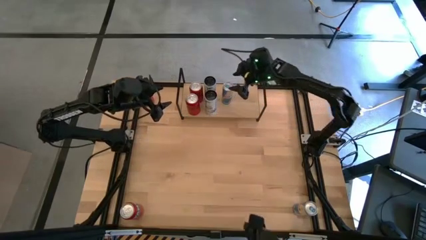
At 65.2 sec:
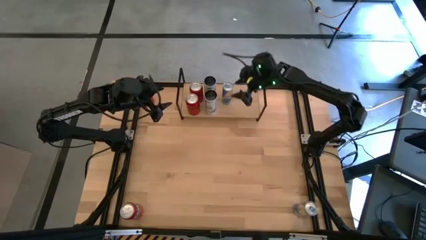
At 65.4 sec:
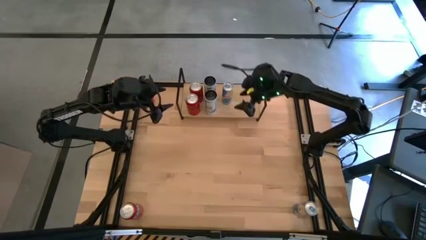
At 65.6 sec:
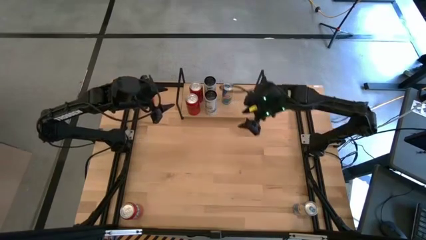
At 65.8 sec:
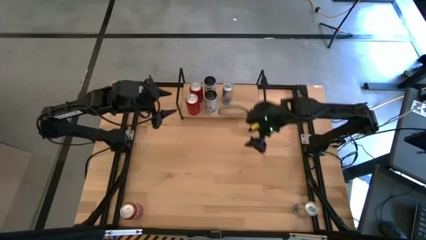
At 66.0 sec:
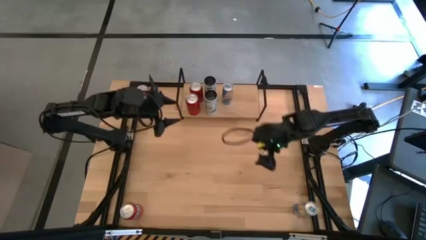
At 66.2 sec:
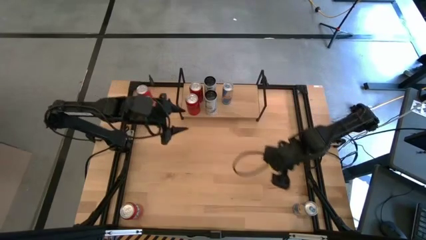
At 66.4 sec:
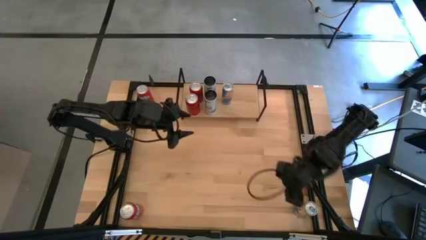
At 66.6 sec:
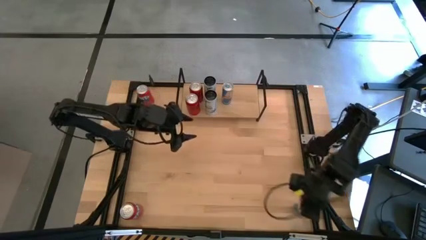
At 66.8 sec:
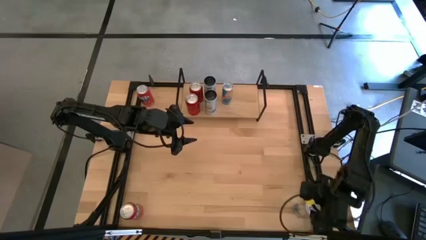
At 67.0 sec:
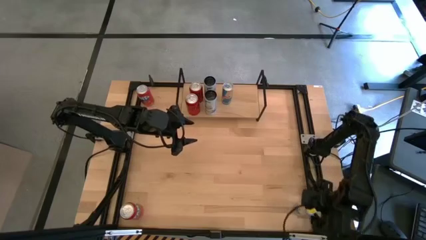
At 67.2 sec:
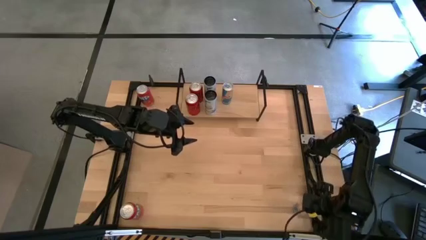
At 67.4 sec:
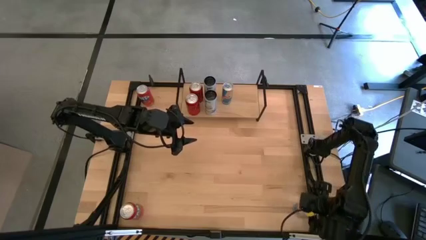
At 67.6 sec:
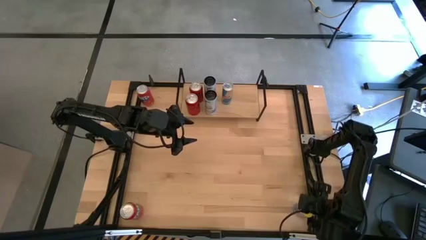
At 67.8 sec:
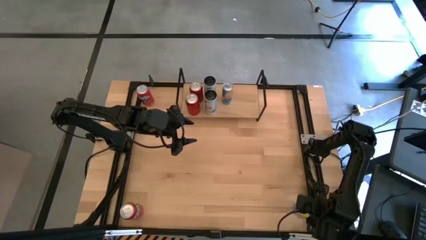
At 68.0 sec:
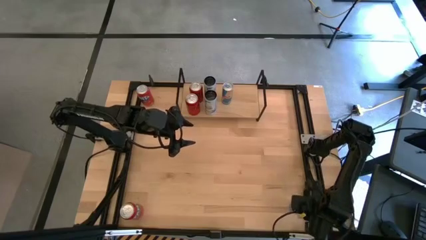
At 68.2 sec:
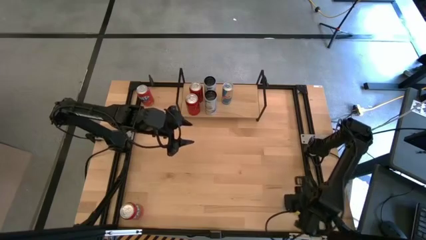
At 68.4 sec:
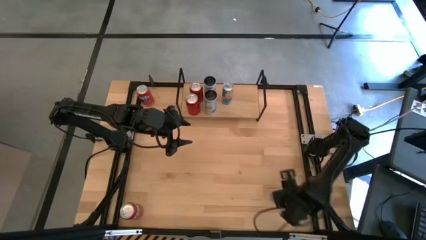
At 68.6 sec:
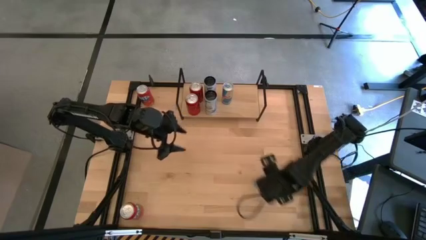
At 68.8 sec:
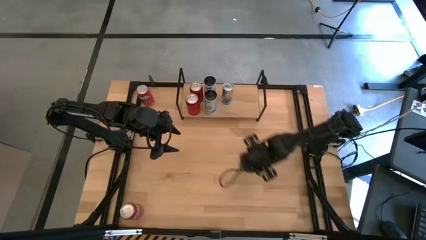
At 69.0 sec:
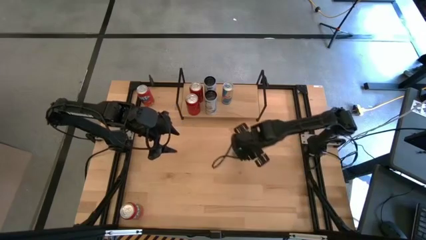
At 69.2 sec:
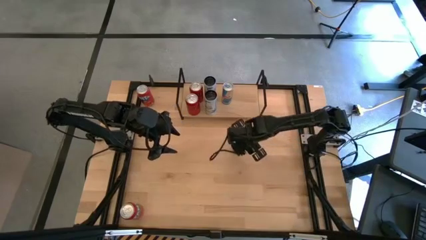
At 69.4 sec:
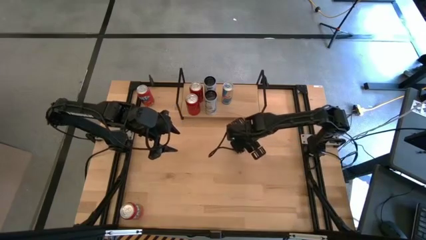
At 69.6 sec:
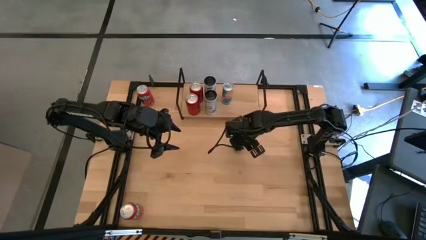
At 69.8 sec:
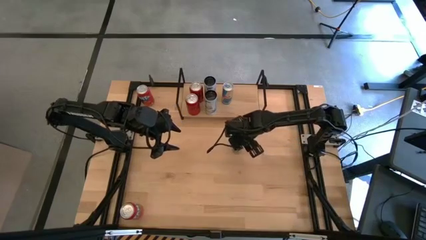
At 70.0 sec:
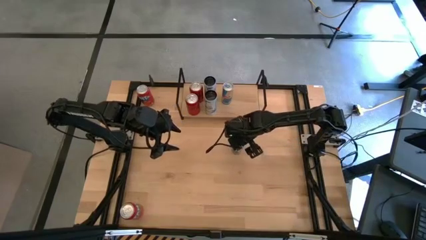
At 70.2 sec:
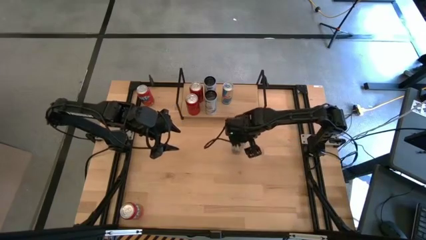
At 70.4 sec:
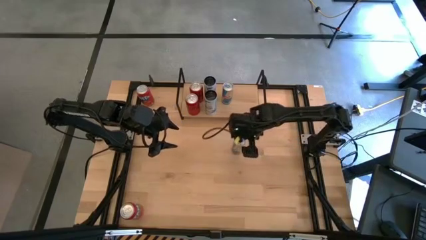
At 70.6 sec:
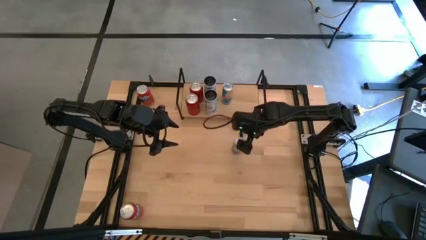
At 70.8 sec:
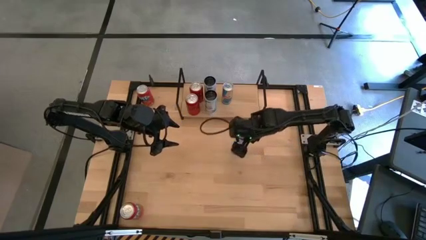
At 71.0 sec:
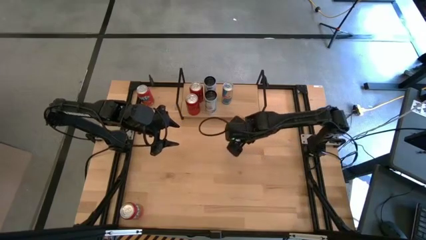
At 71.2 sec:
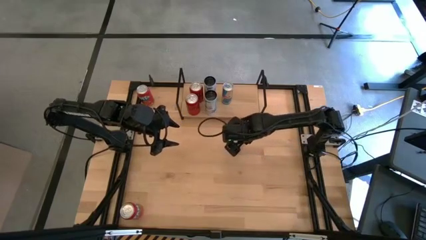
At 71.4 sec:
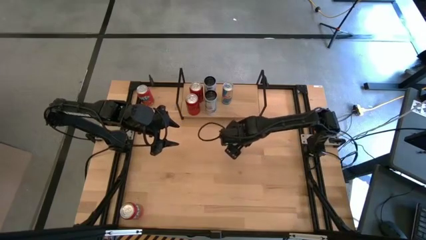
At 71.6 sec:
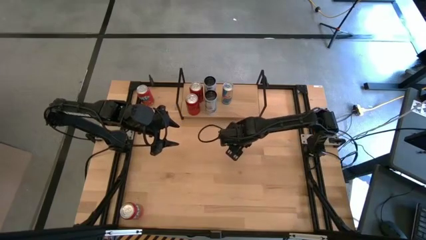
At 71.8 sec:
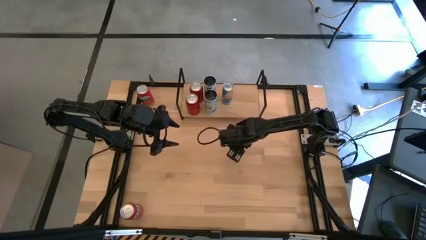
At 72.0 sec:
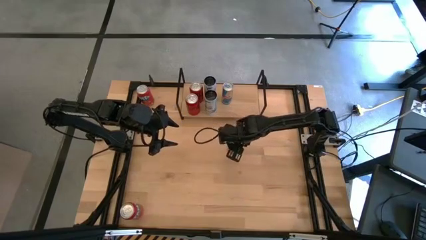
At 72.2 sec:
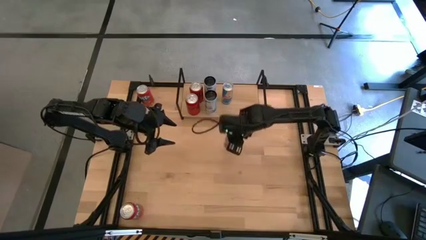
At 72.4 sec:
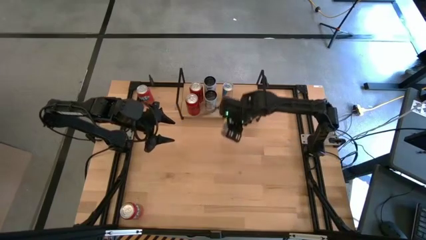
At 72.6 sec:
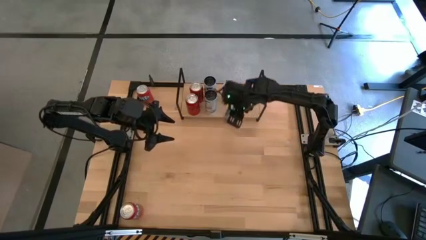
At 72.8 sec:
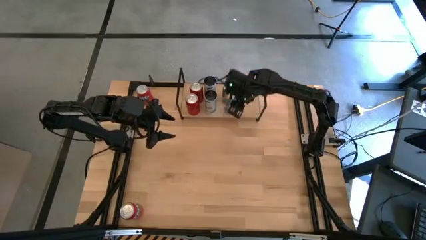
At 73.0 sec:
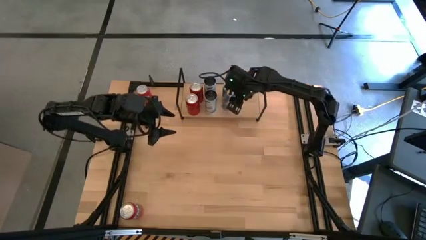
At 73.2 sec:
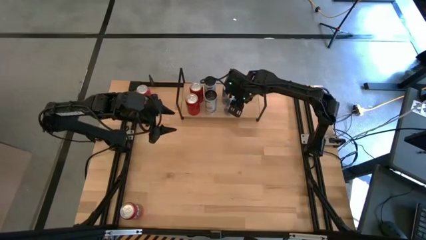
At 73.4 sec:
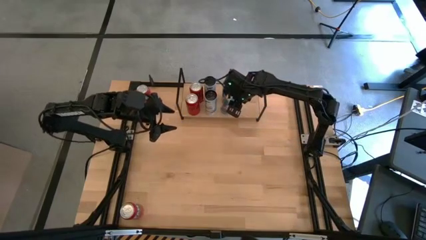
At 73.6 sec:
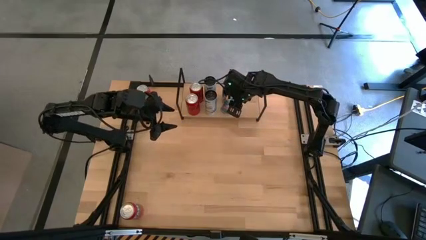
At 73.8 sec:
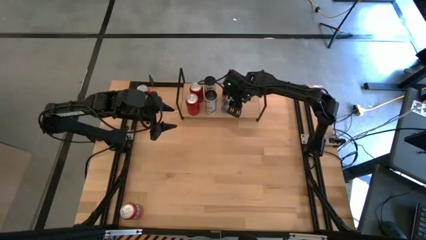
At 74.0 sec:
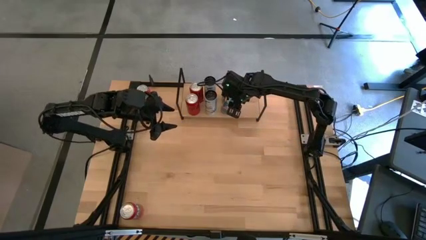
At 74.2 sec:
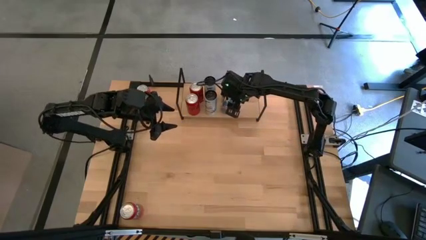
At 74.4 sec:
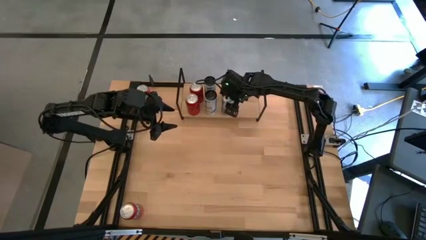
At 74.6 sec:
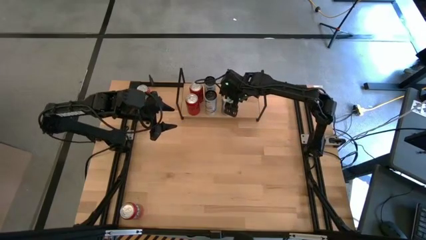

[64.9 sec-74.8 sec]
Task: Place canned beverage on shelf
Put the blue soda can on the shelf and align it with the other blue soda can

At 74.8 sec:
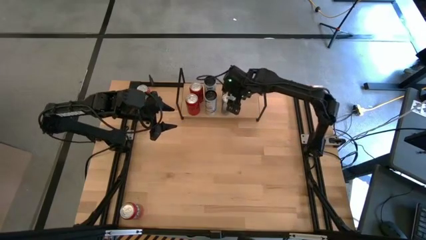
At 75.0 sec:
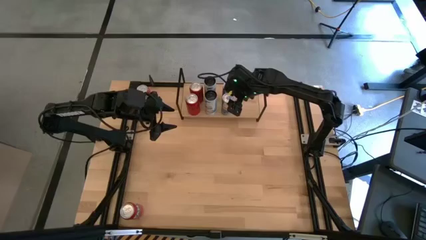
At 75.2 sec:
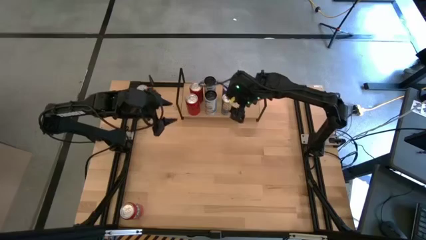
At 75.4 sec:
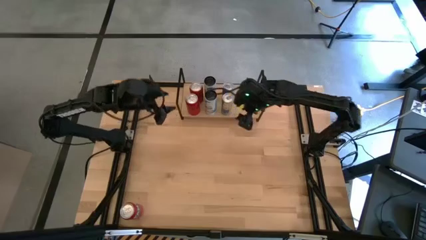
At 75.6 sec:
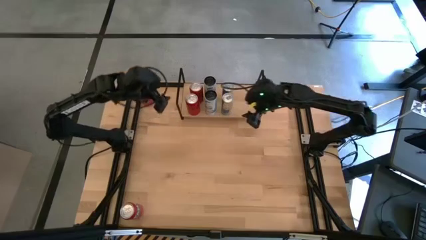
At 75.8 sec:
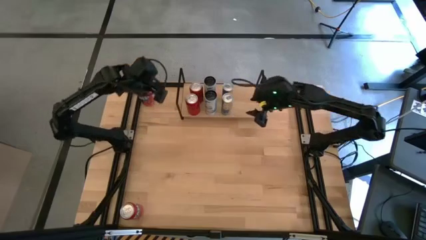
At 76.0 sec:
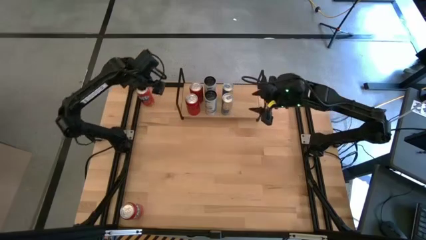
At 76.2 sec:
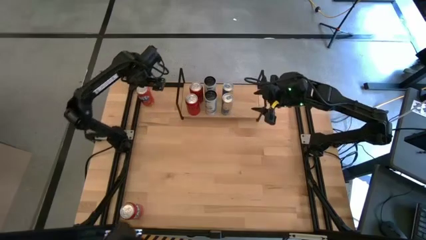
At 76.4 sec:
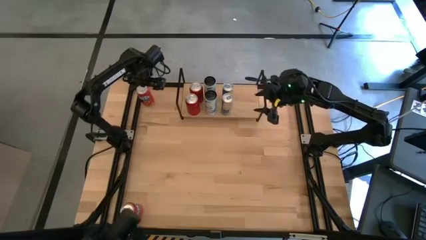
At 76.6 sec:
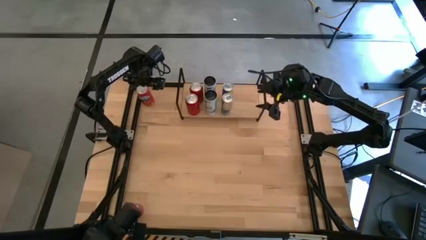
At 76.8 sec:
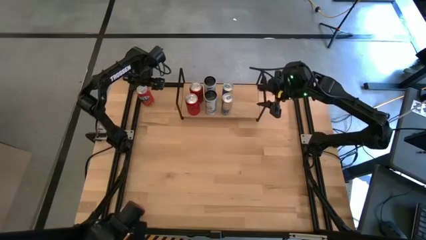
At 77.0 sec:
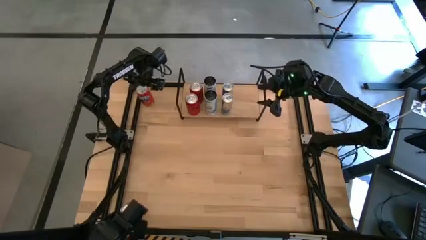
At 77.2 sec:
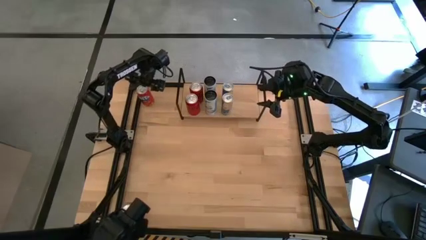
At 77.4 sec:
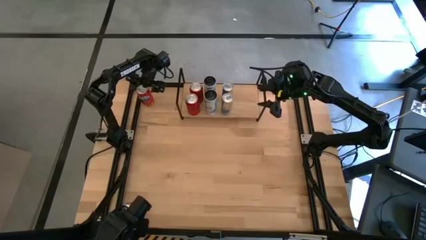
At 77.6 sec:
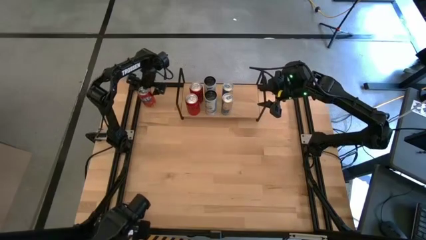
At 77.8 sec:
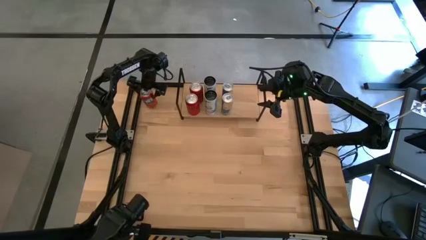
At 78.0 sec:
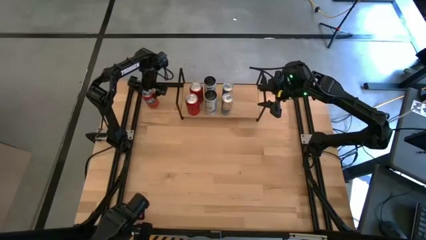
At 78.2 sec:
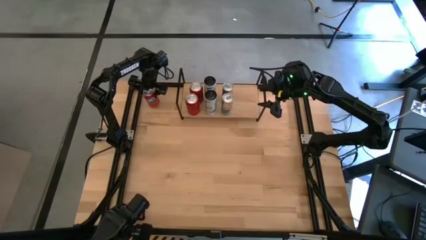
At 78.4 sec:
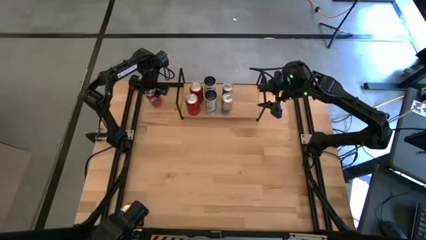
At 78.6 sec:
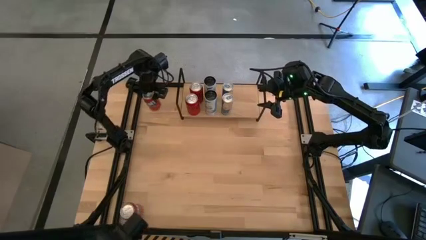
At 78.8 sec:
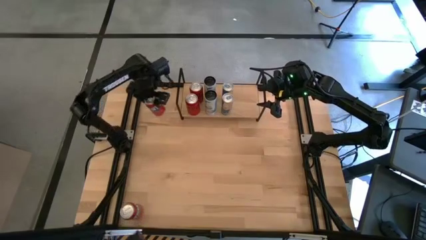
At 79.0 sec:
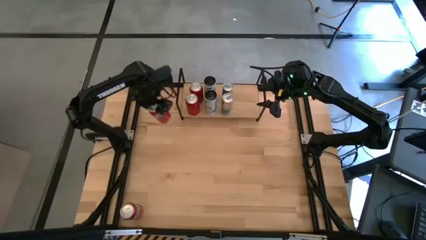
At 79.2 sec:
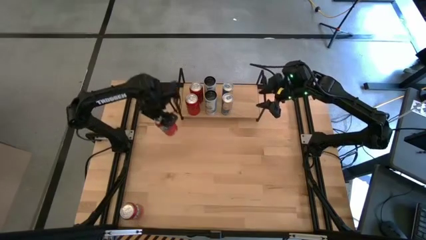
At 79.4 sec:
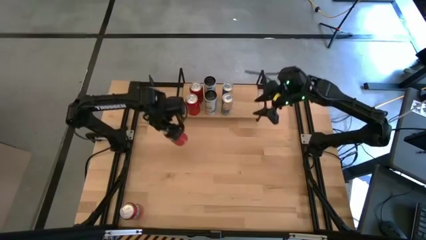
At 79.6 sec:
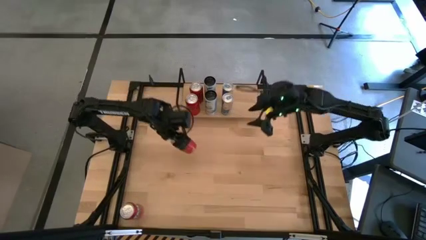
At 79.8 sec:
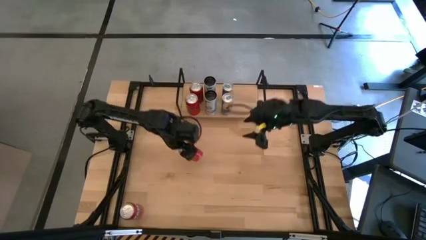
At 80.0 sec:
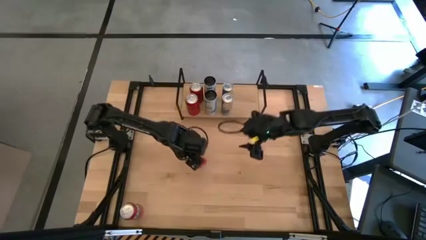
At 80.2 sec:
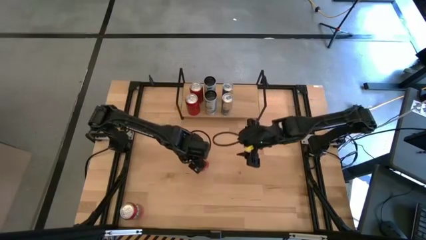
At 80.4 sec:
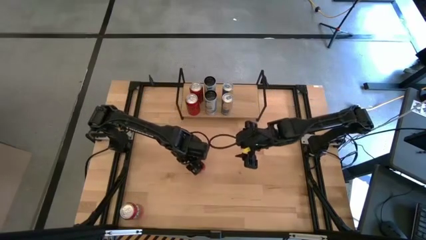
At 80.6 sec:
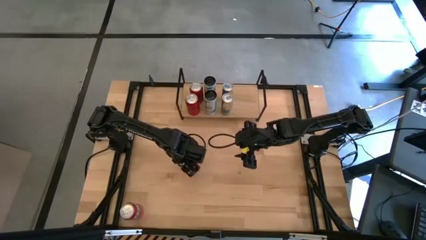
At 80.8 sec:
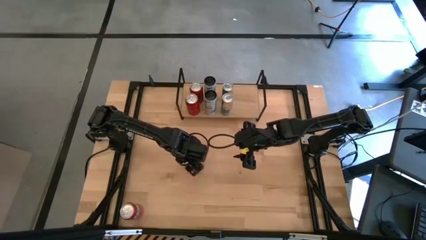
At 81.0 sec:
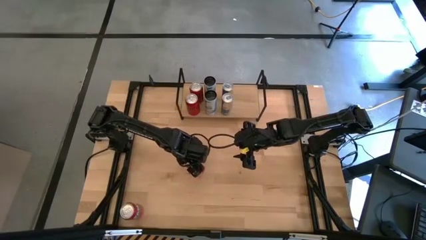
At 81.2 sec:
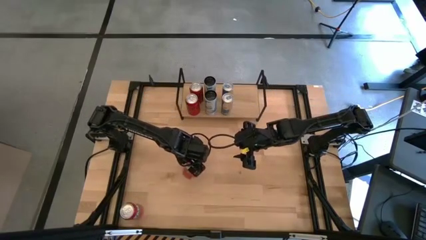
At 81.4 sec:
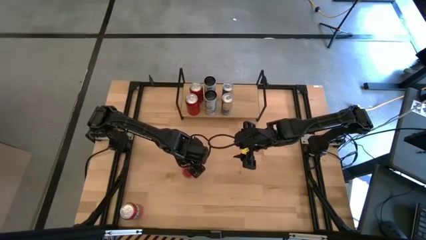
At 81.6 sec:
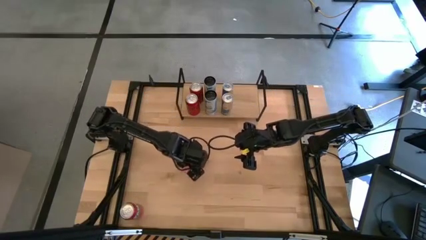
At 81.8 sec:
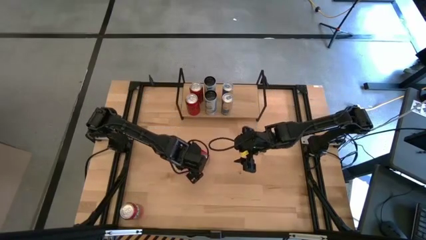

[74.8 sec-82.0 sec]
Put the top orange soda can on the shelf
